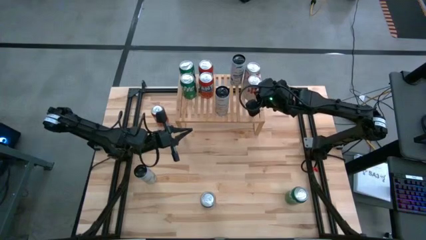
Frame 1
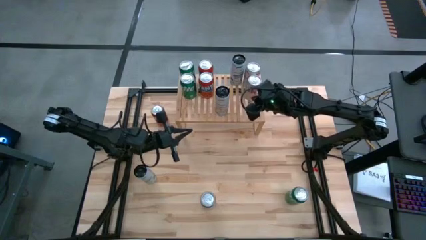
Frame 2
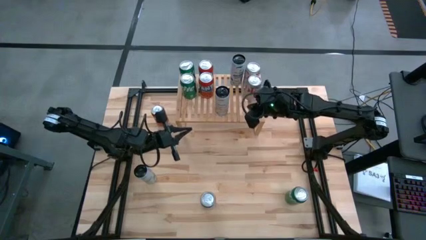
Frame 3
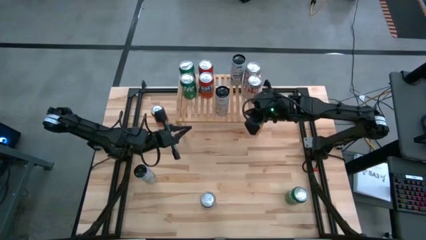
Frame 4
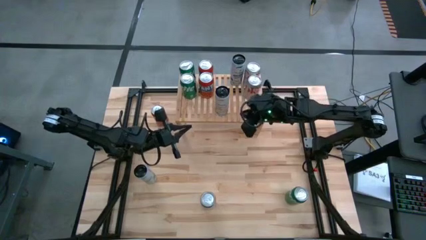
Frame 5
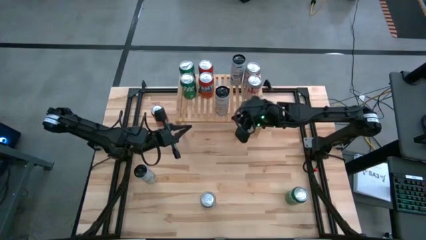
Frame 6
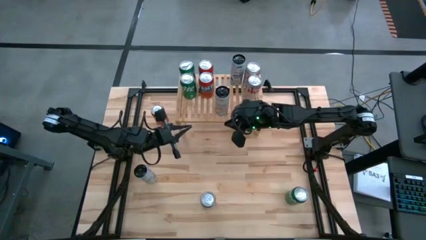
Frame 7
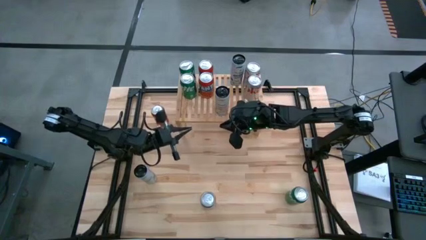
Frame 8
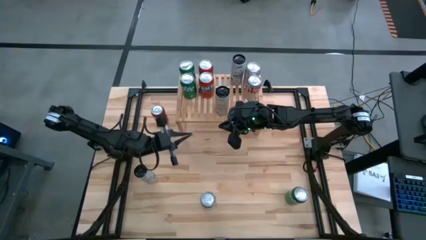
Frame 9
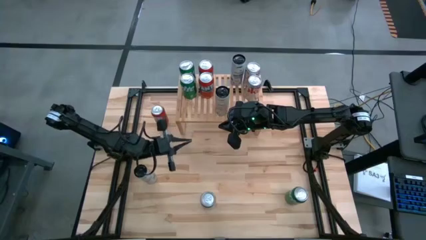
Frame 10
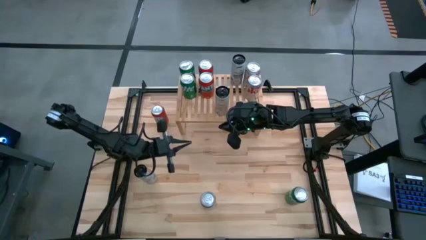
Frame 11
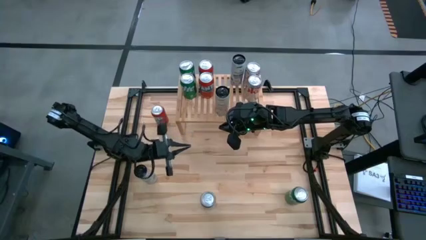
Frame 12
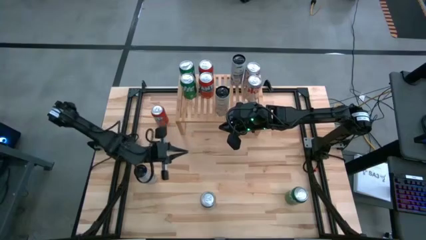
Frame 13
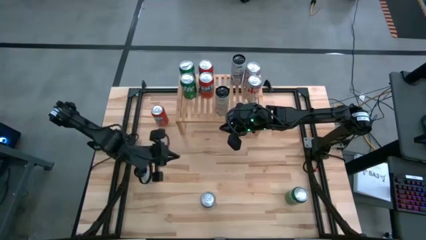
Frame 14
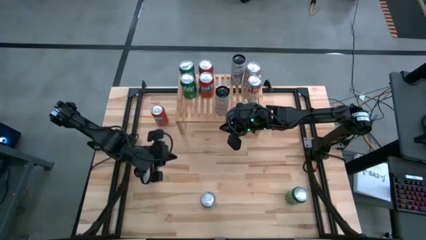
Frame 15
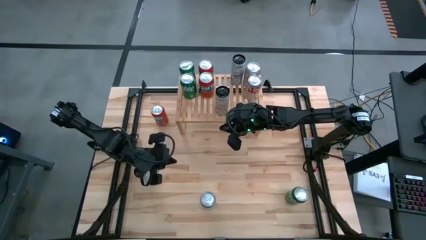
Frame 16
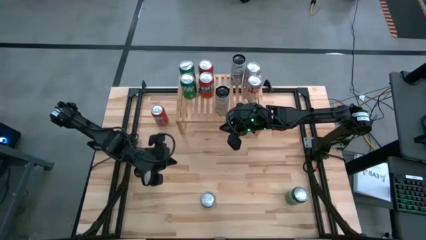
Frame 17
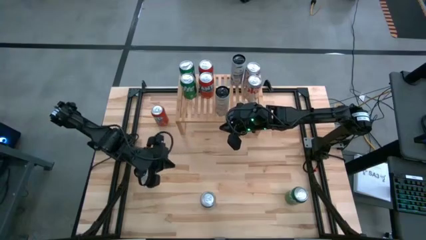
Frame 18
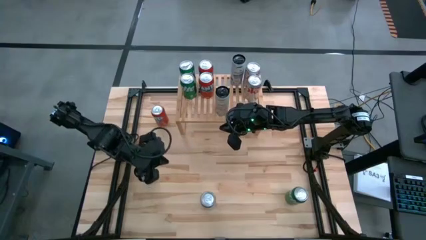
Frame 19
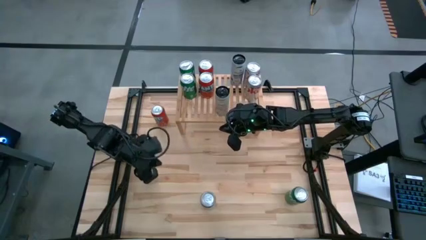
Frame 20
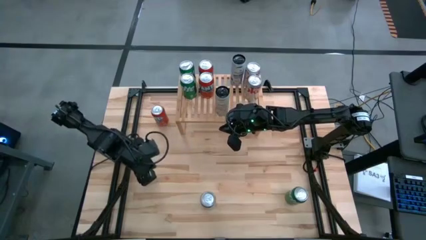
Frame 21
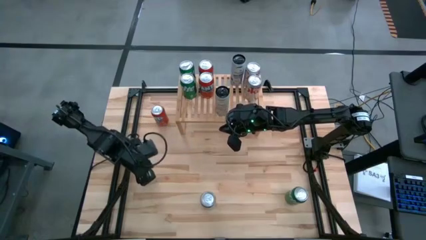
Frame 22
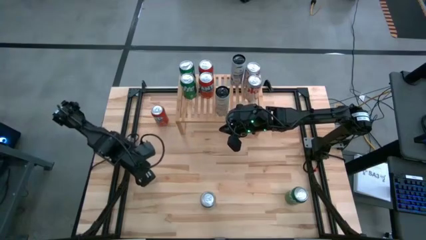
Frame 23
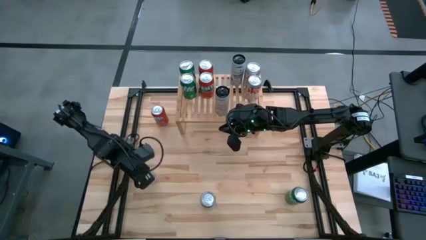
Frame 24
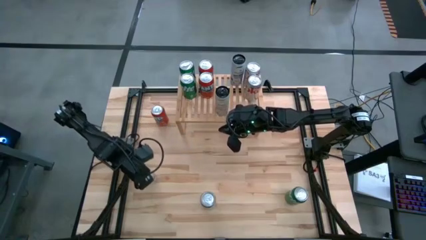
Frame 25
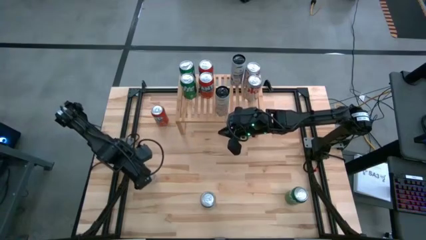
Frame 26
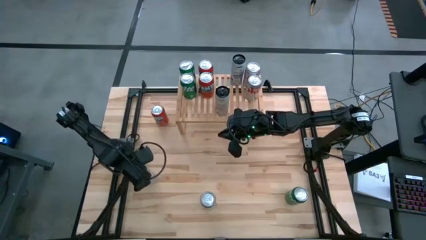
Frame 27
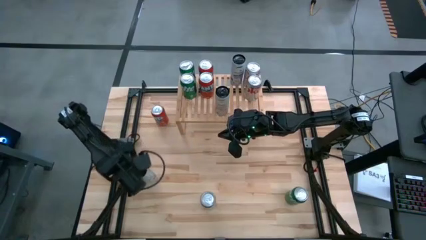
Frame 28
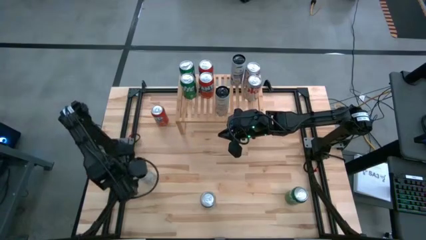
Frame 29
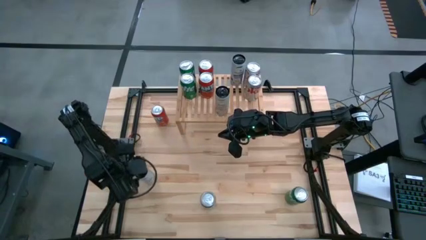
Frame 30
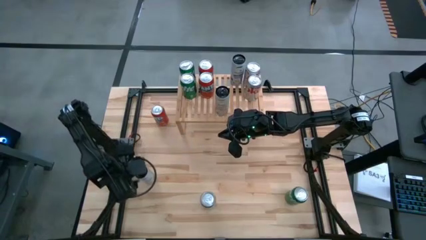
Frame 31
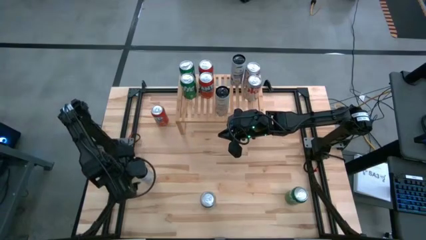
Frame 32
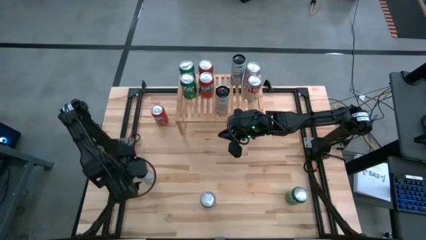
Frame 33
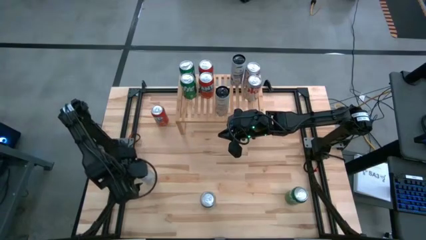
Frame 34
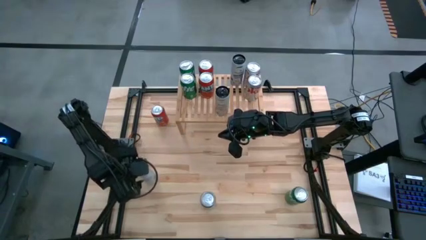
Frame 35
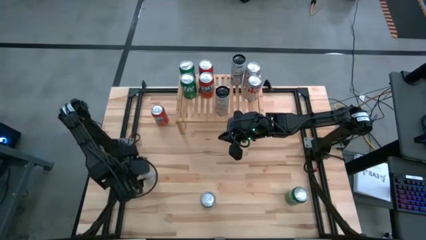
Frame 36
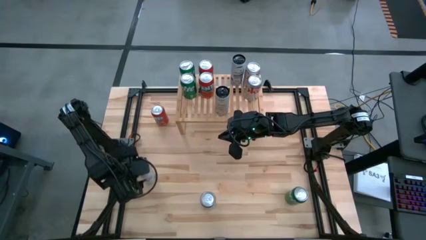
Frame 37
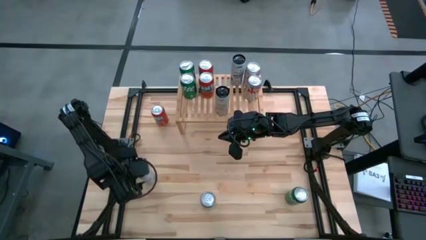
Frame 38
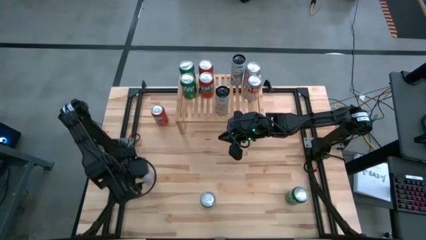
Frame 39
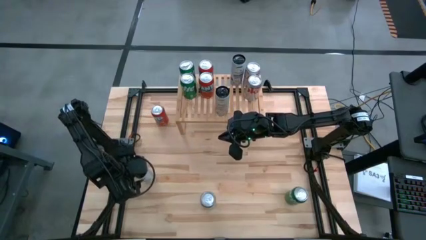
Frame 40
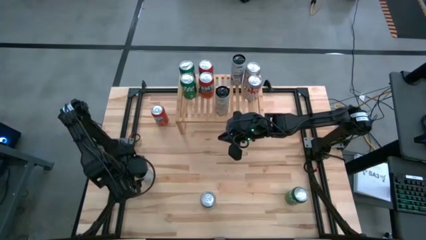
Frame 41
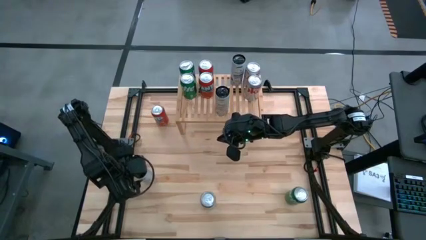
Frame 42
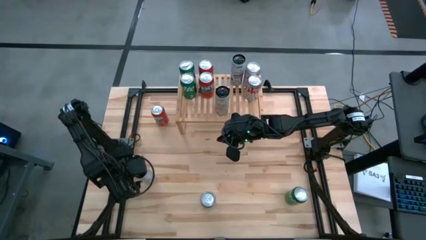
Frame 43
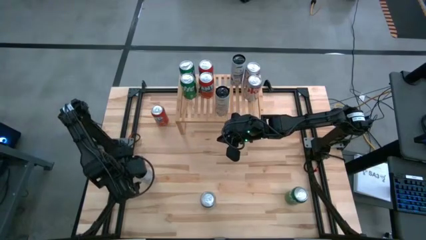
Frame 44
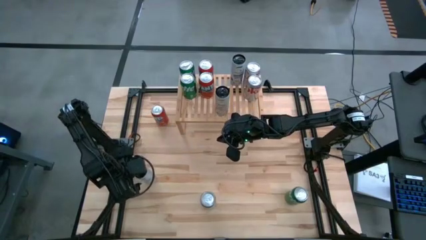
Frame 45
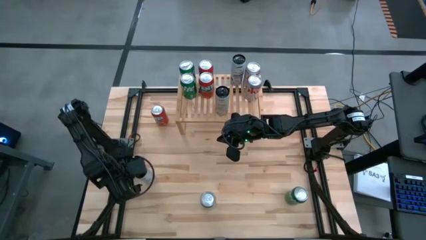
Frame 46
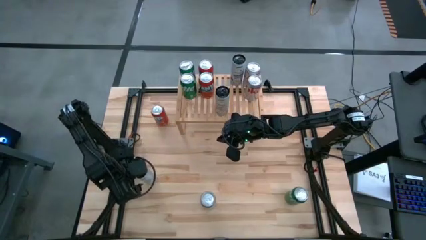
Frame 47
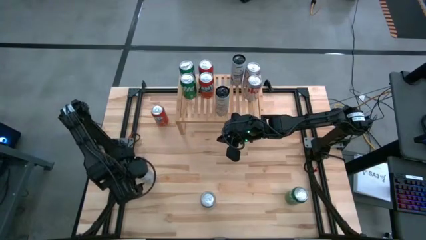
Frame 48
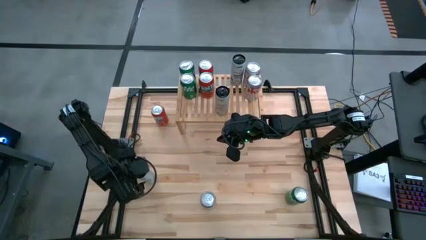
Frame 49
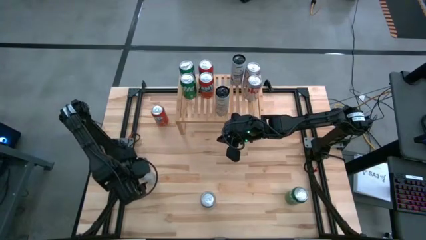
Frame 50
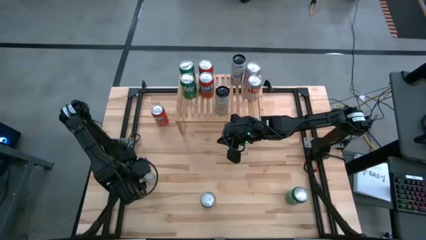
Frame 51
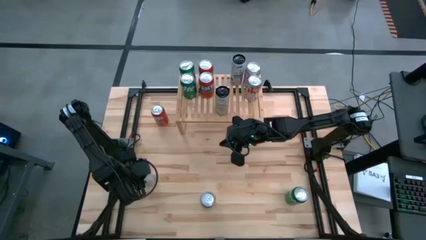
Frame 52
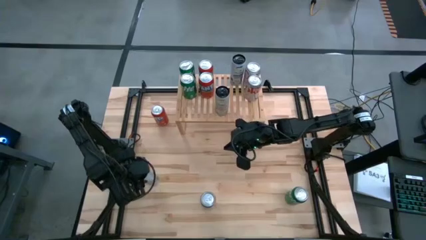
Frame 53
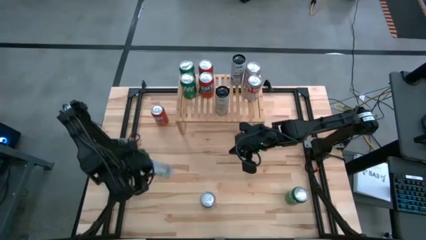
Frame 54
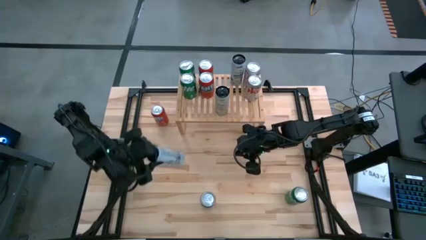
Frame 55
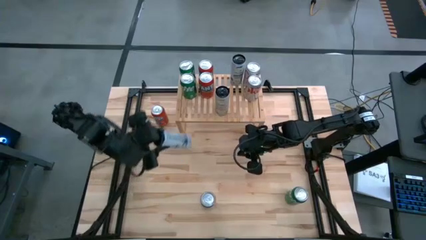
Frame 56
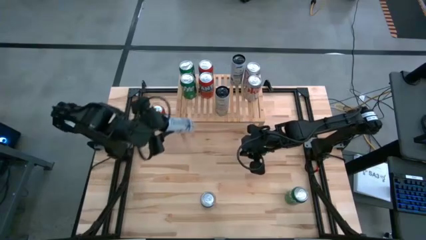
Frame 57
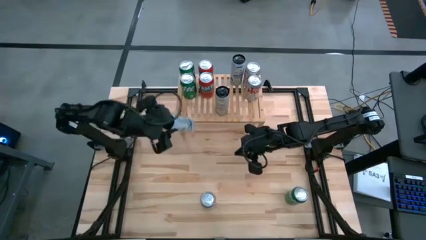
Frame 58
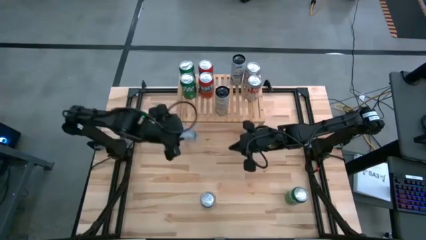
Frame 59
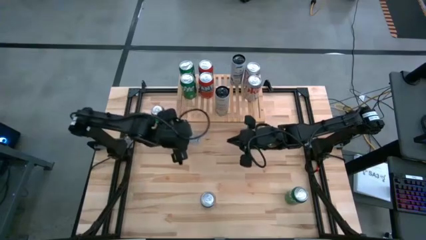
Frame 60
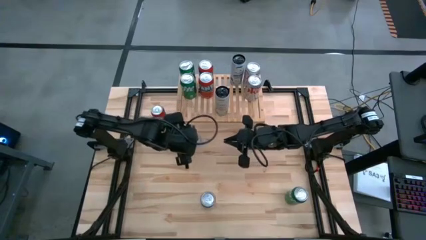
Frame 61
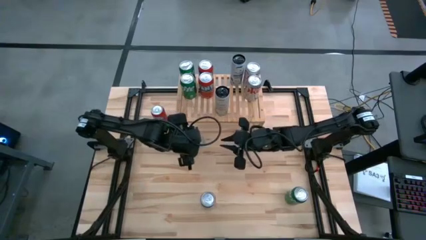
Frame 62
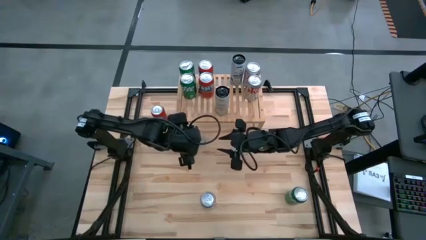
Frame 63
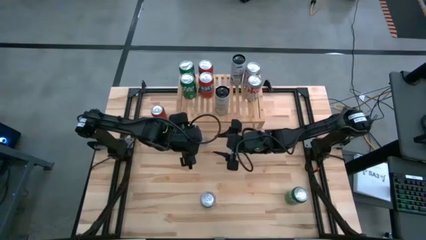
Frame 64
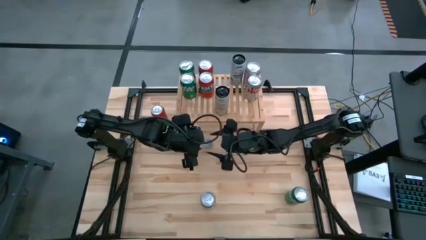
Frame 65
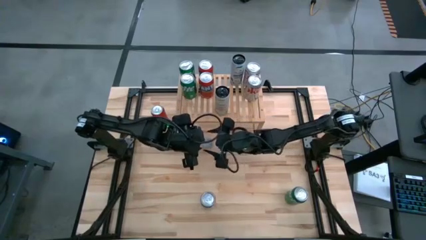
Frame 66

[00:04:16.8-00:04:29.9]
Task: Place canned beverage on shelf
Put the white blue soda can aligned with other white blue soda can on the shelf
